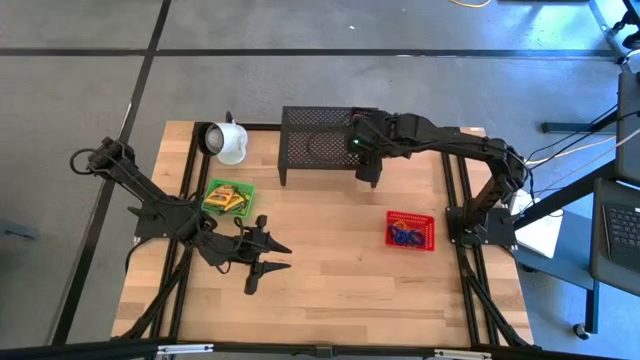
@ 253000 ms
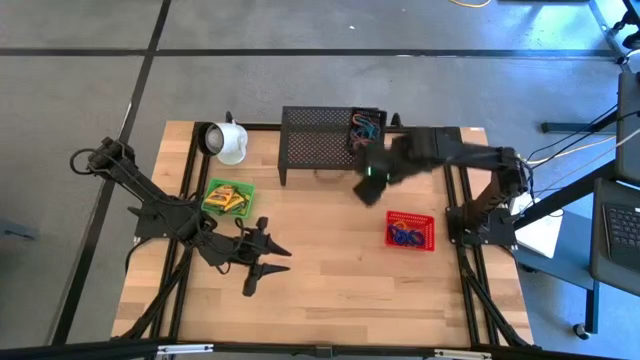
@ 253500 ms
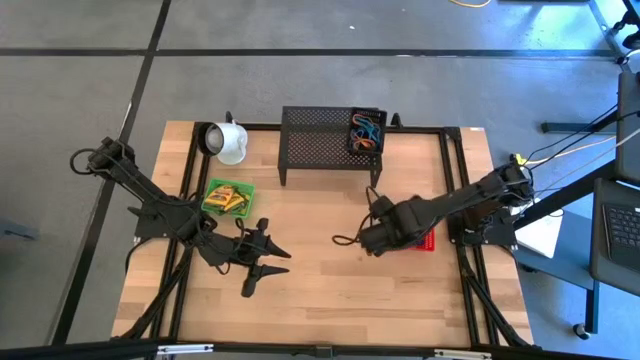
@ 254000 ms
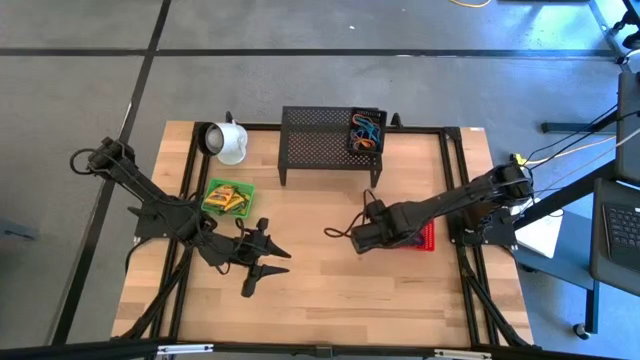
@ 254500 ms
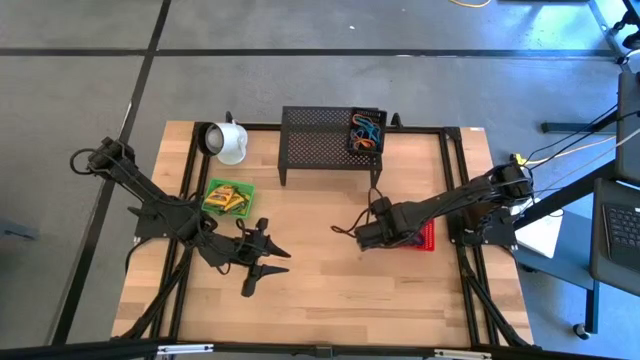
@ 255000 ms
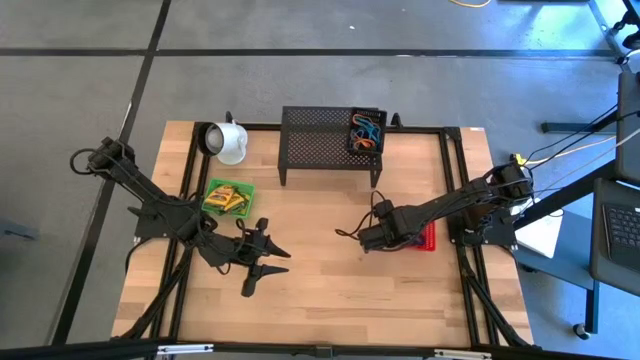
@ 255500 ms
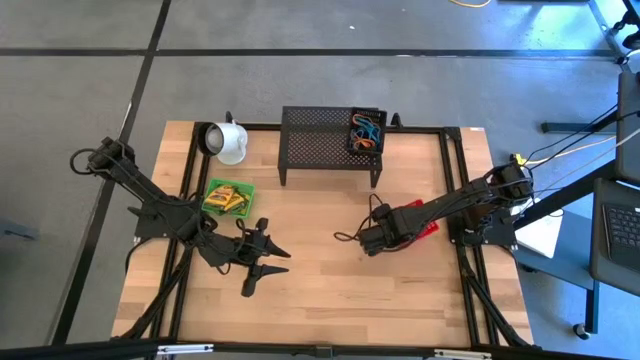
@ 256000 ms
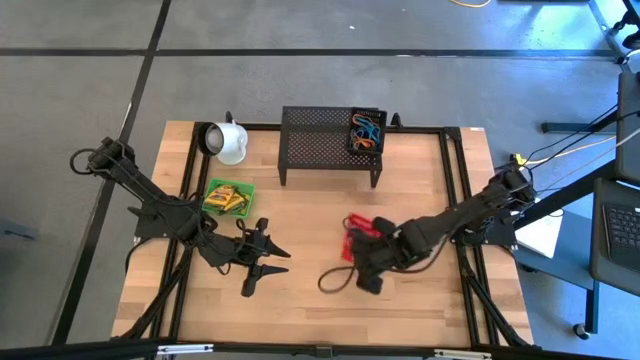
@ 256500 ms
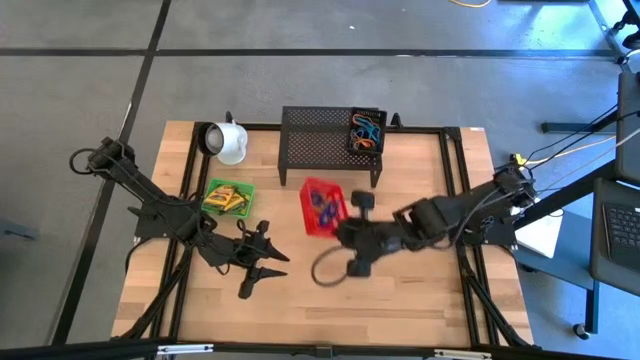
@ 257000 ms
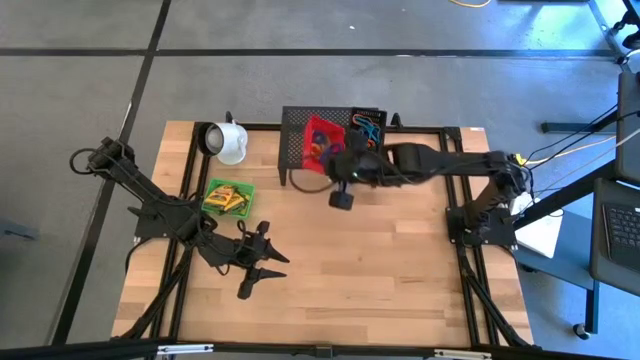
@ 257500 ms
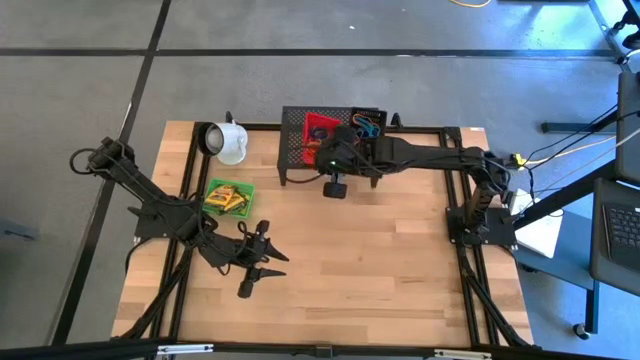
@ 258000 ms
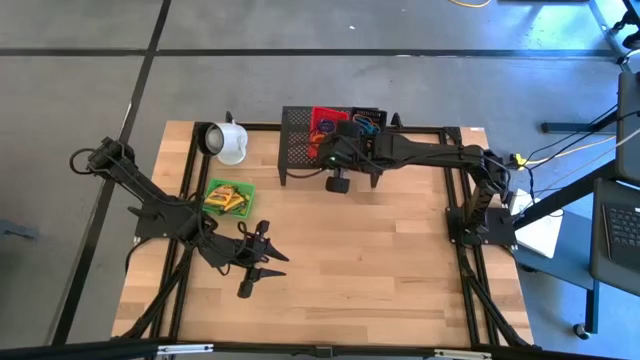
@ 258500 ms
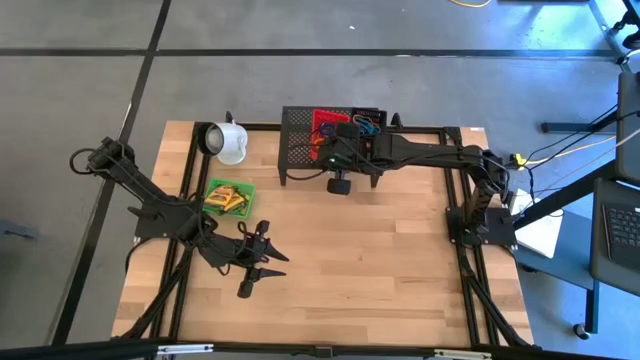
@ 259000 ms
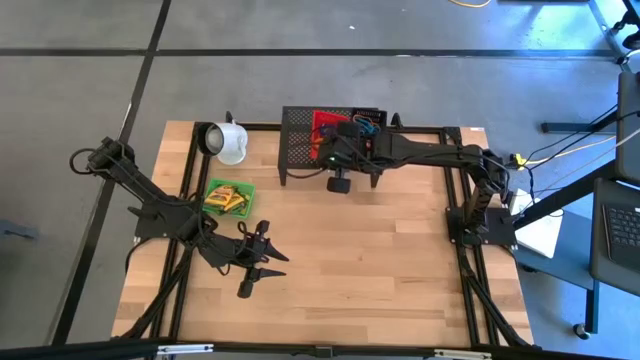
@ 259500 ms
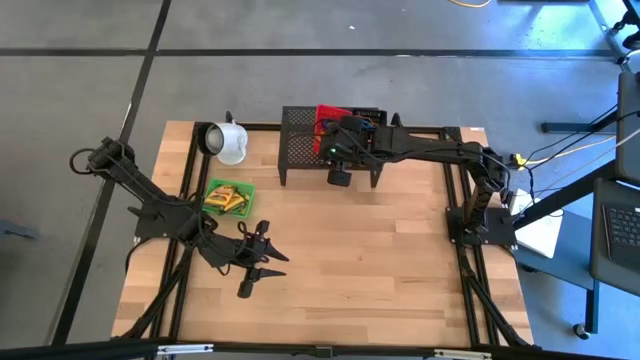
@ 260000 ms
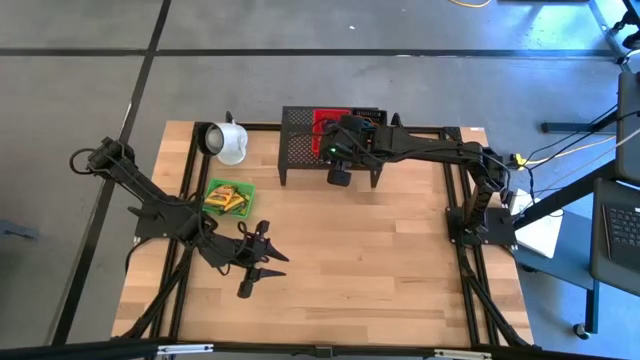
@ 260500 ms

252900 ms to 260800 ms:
Task: Pick & Place Office Desk Supplies
Put the orange bin on the shelf

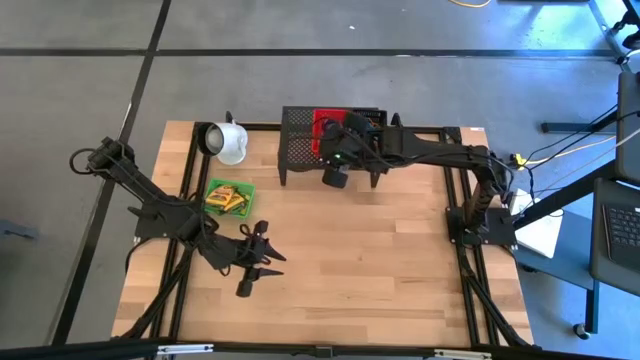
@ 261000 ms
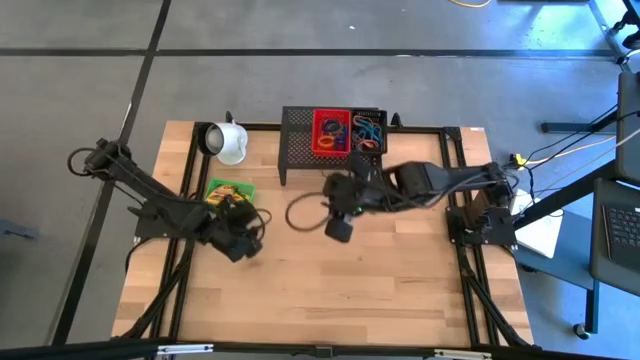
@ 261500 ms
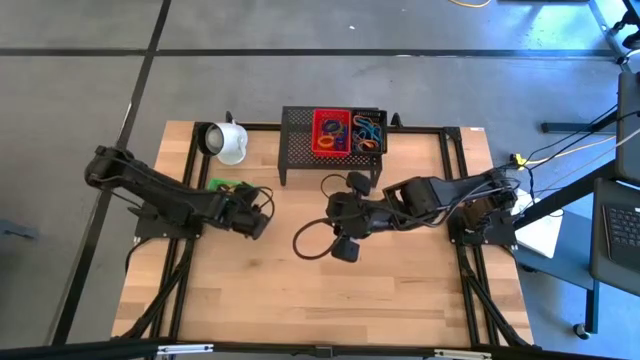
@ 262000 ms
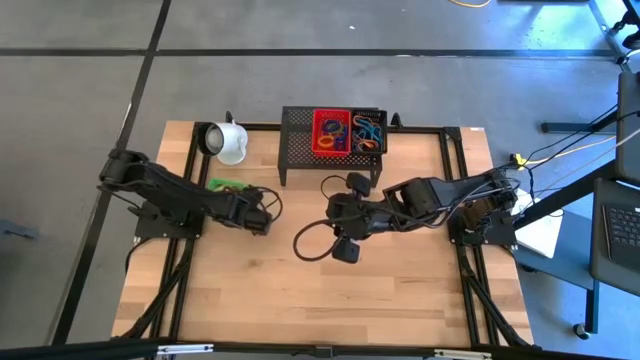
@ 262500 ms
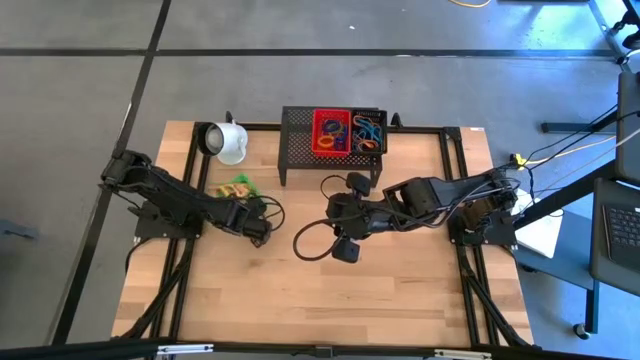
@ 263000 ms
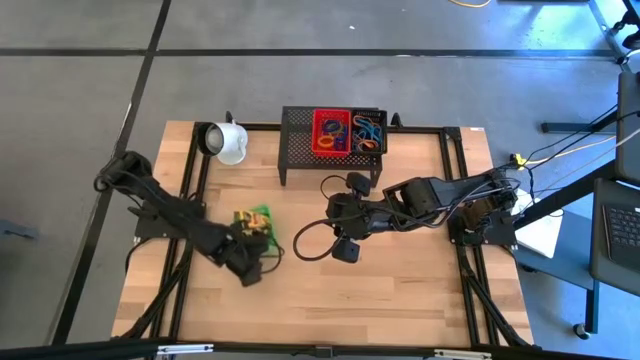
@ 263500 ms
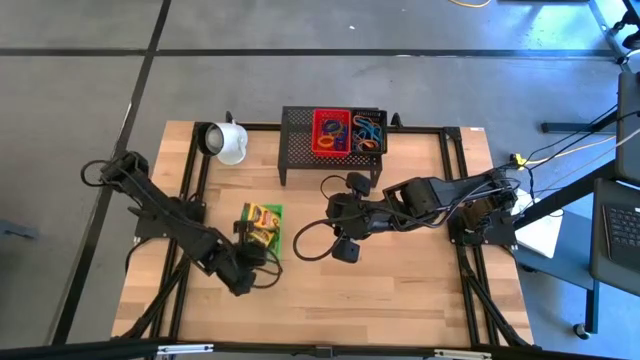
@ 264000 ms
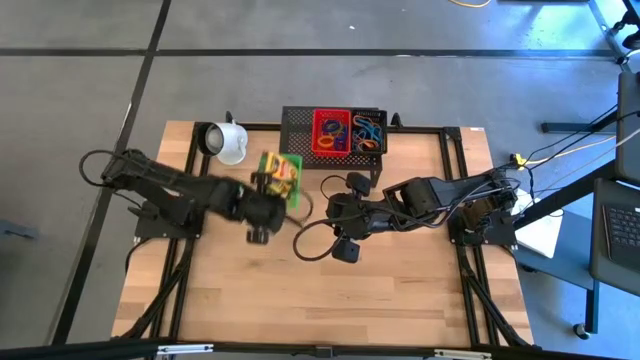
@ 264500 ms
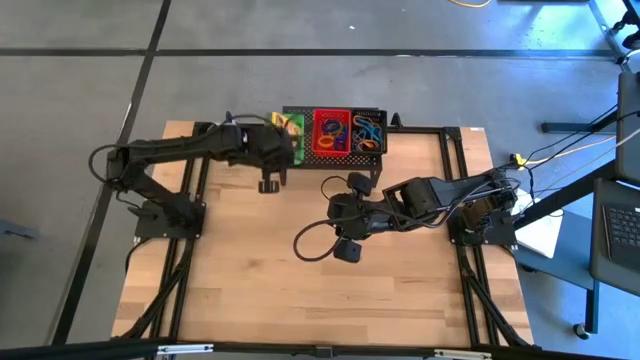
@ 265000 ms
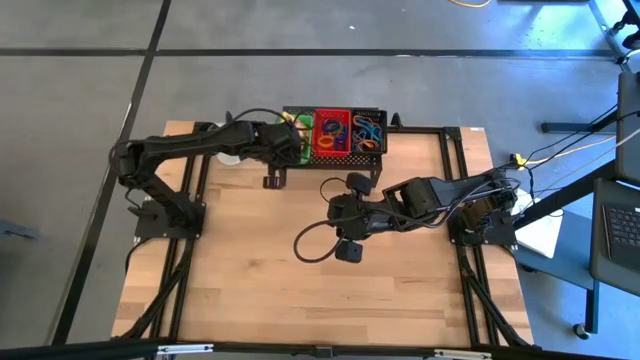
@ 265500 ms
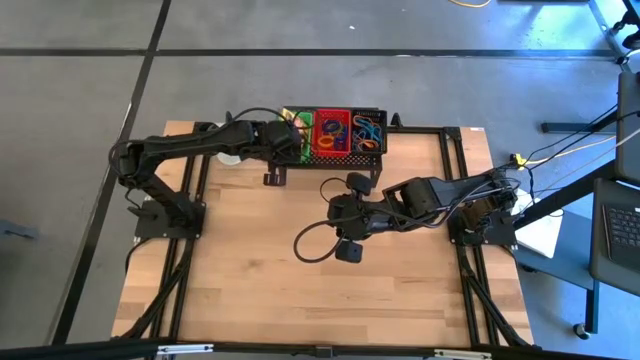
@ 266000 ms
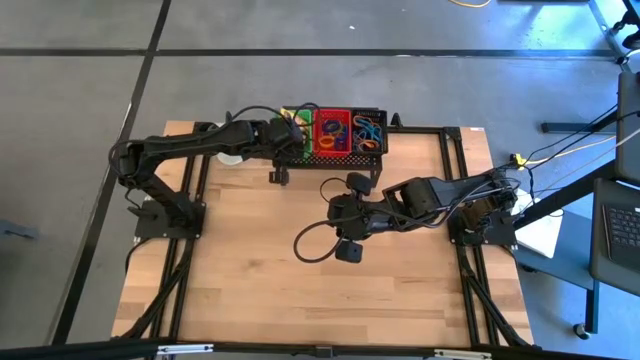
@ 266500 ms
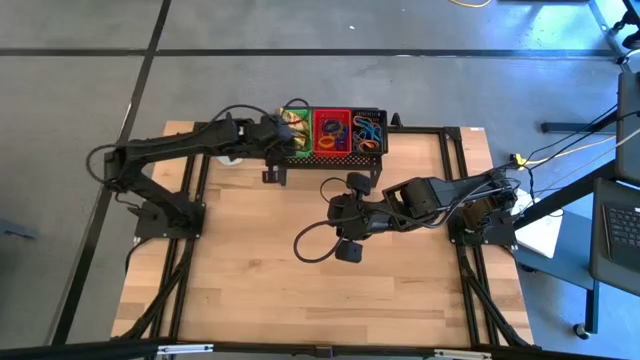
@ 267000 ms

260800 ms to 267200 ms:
Put the green bin on the shelf

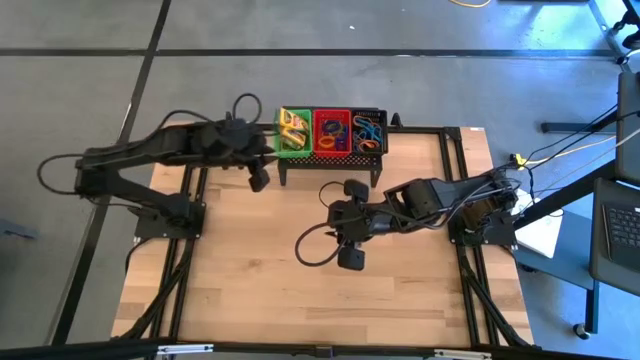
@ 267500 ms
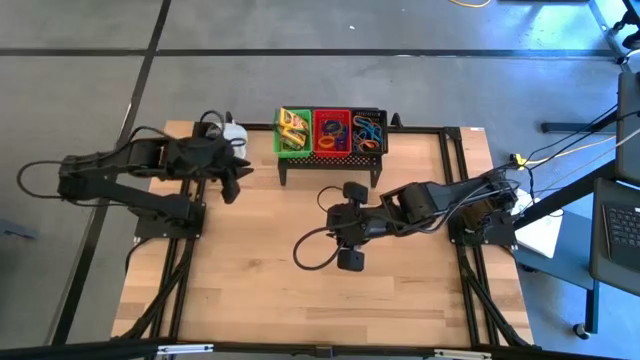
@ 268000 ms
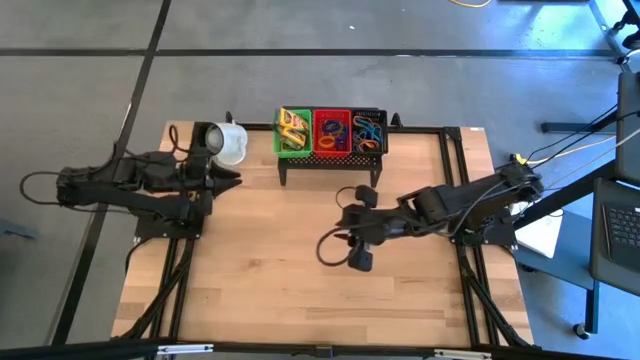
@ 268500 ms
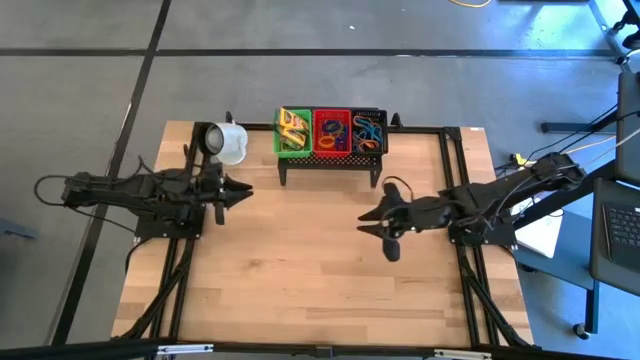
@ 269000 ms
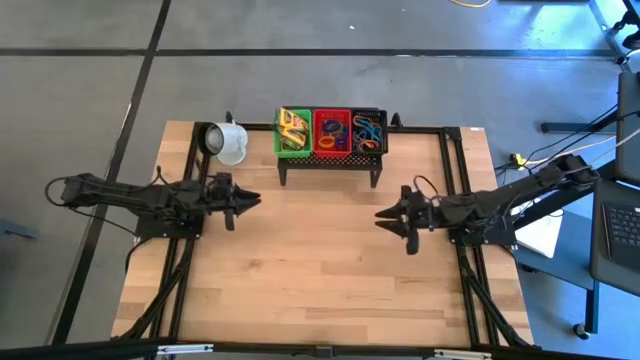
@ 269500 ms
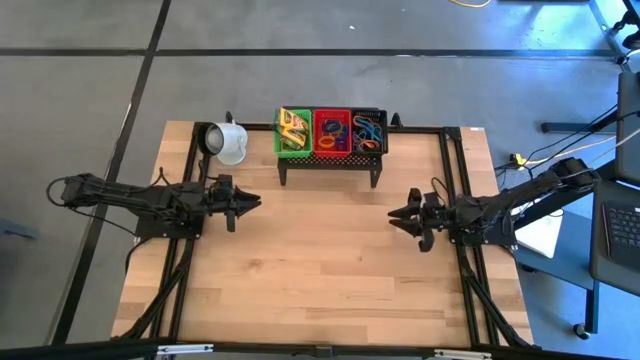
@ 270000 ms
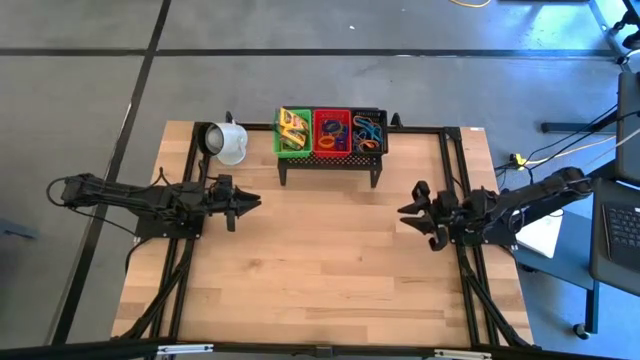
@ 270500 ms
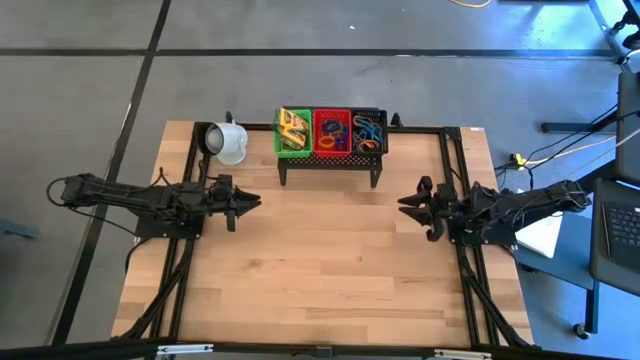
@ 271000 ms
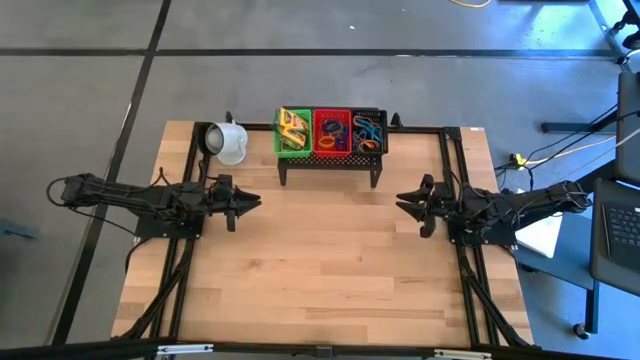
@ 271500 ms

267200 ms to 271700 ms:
Return to Home Position
